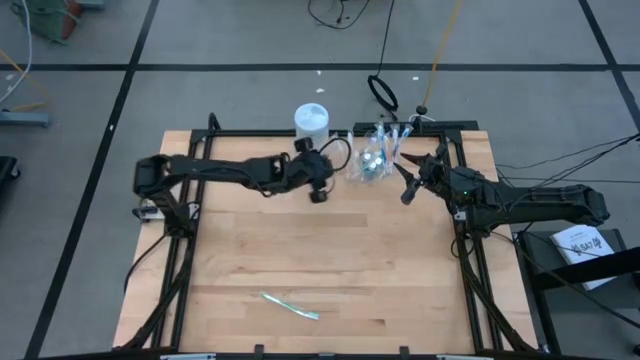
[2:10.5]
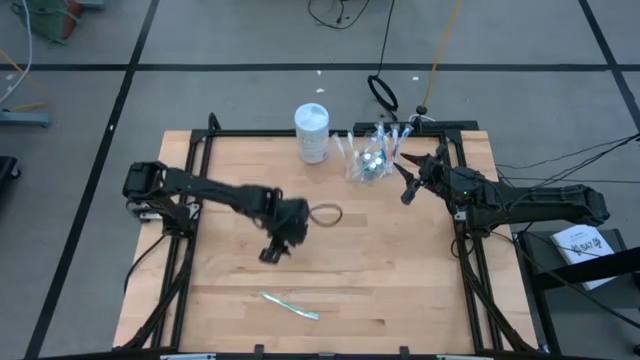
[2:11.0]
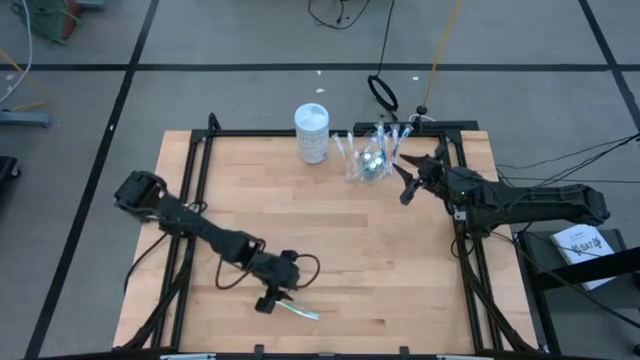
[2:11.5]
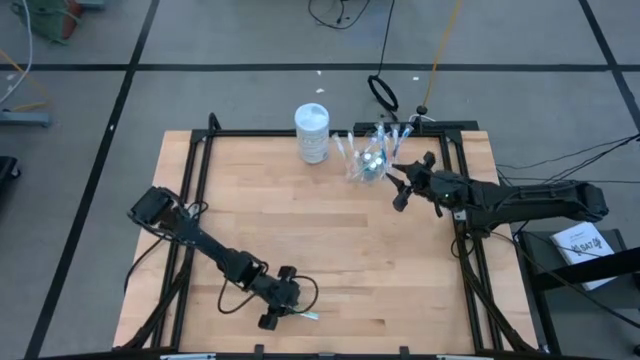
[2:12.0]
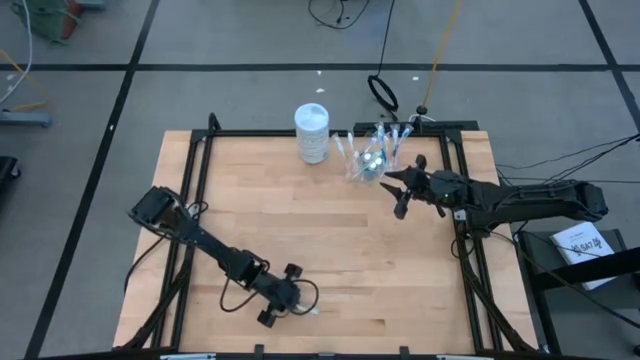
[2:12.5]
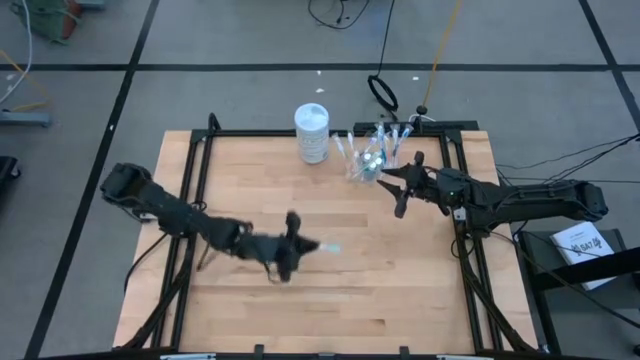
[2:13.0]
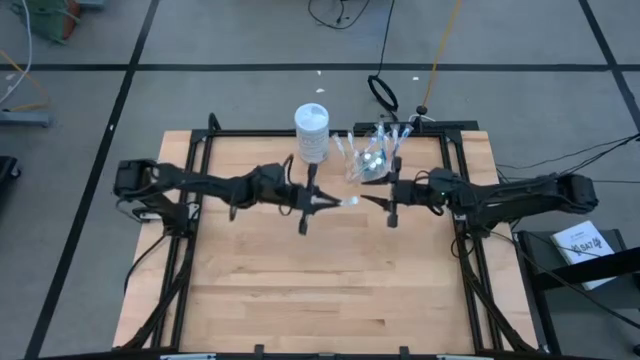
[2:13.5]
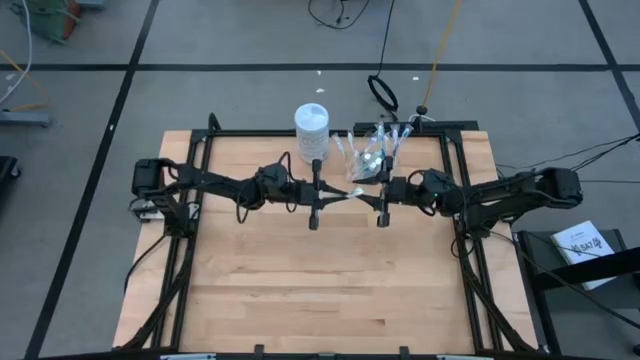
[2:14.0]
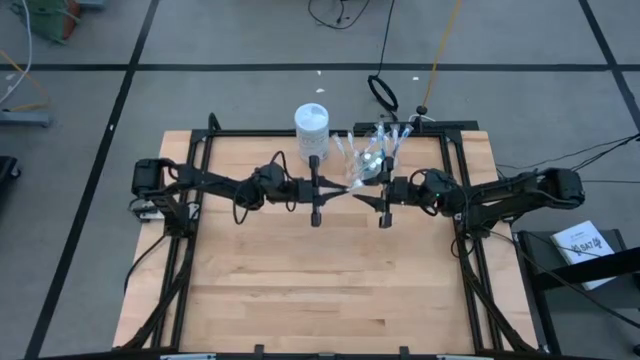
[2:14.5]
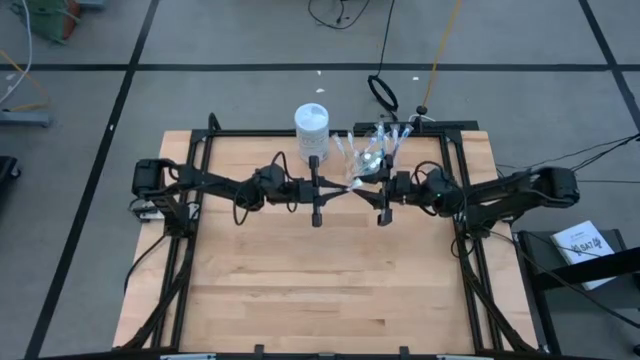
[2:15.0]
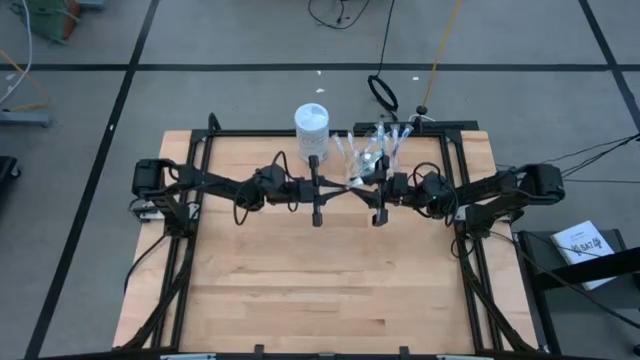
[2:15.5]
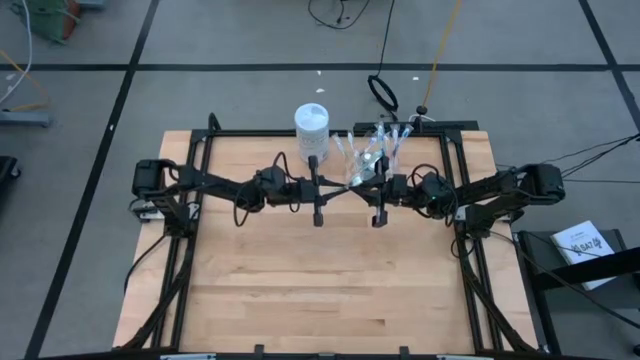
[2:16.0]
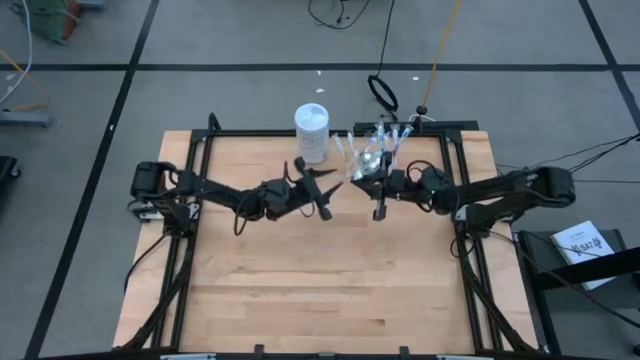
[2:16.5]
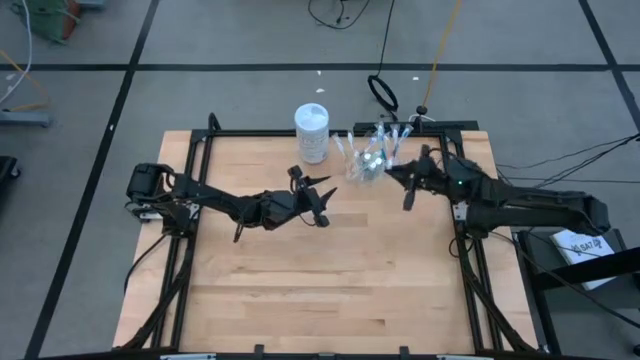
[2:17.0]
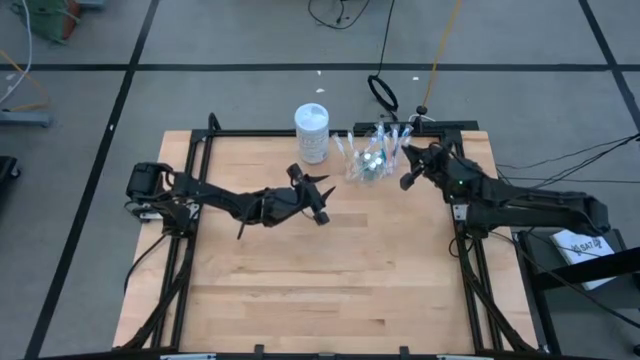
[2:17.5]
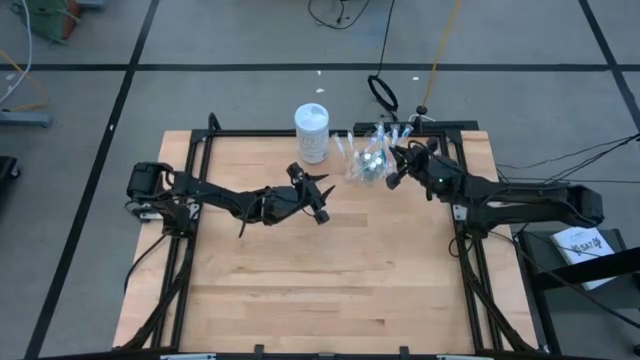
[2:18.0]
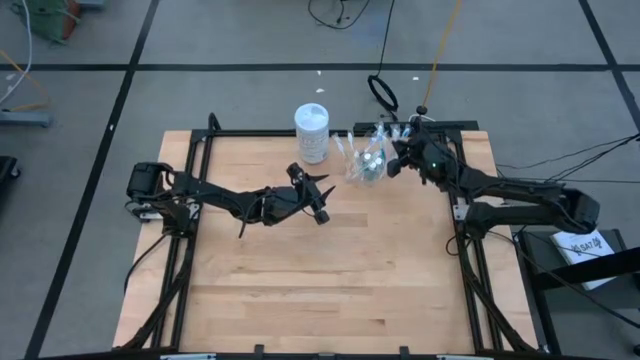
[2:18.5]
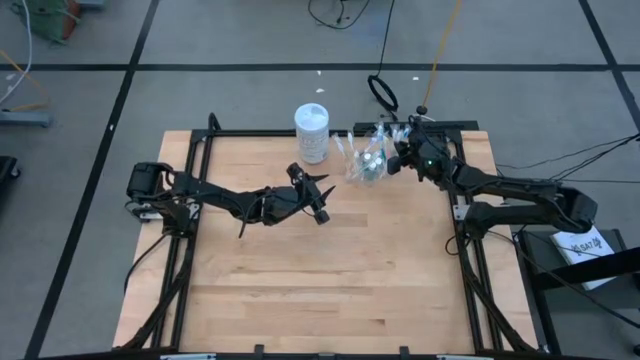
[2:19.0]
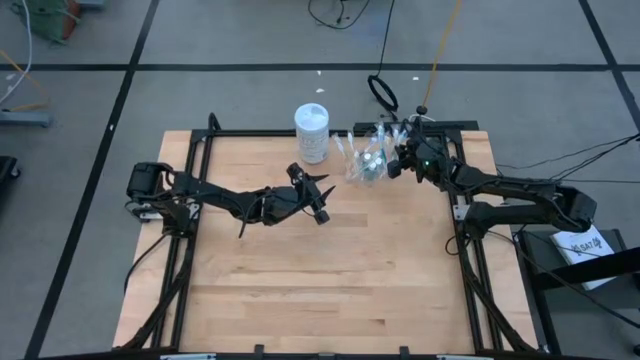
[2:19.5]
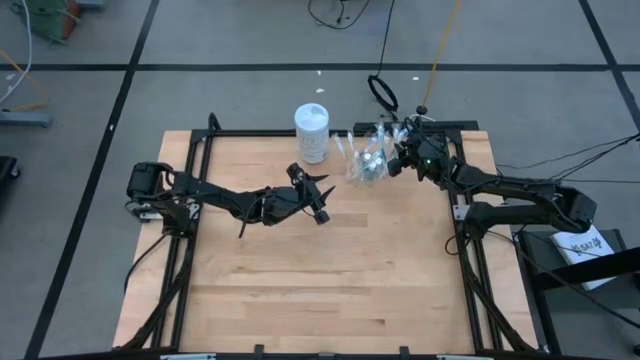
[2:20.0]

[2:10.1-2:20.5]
Task: Pick & Place toothbrushing station
Put the green toothbrush into the transparent organizer

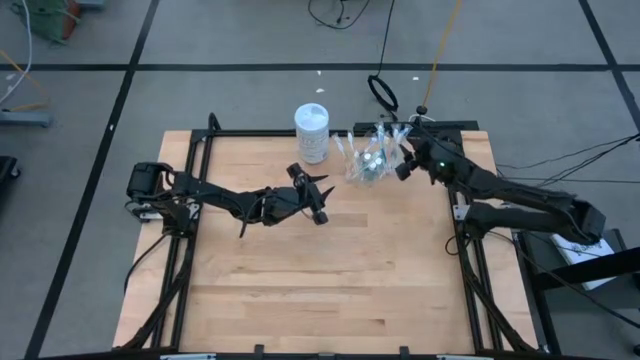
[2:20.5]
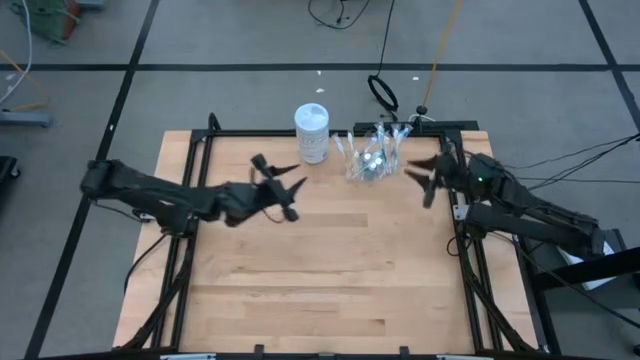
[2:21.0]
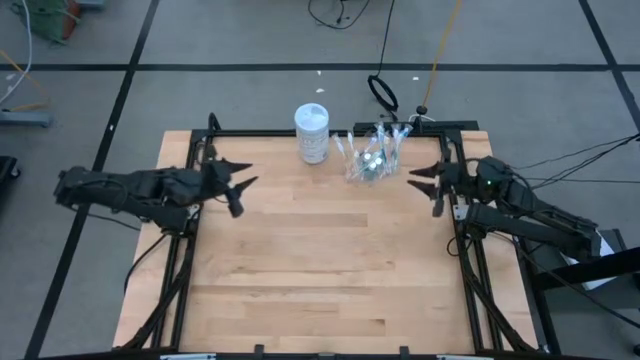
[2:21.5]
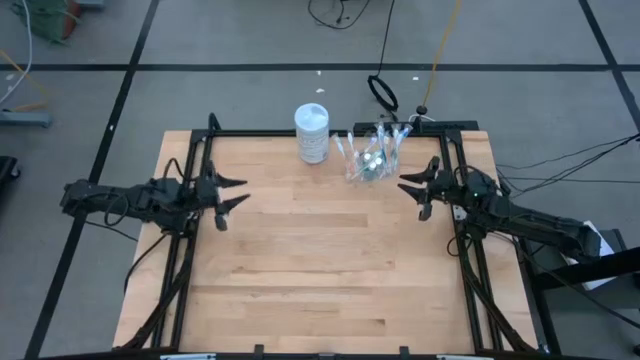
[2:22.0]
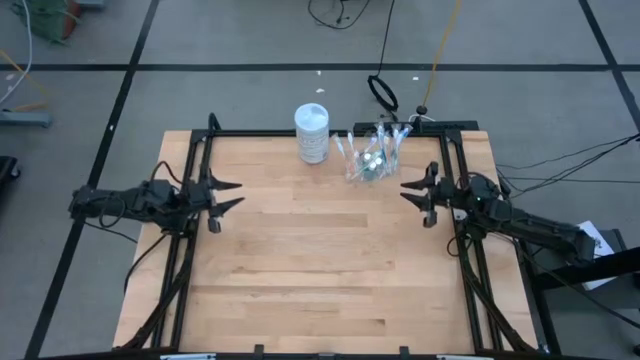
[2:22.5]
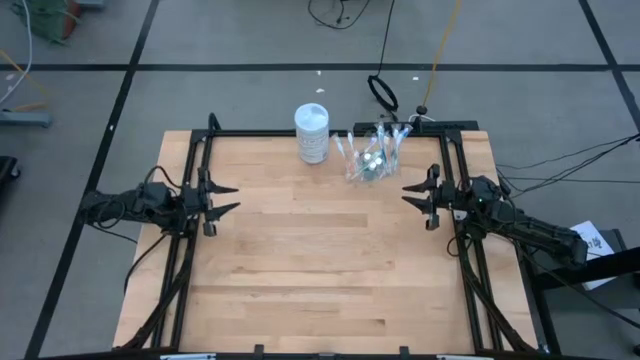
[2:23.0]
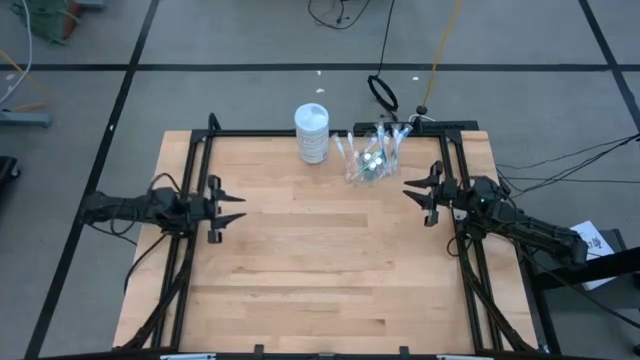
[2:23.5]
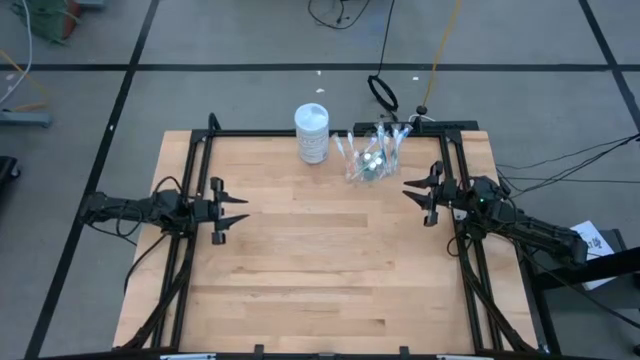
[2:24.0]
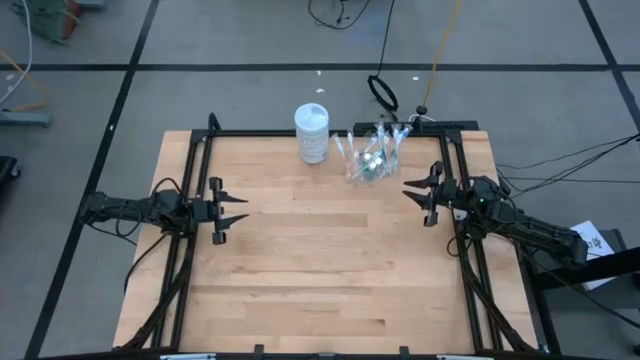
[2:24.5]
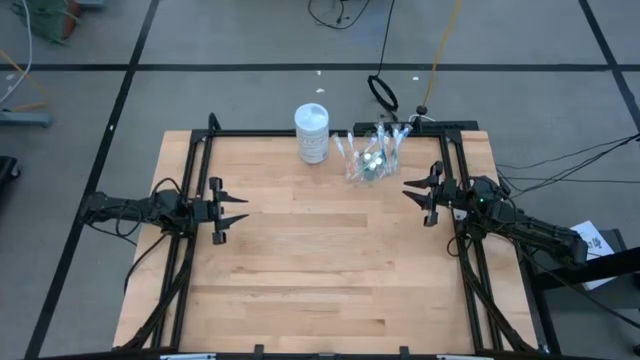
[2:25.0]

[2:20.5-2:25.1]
Return to Home Position

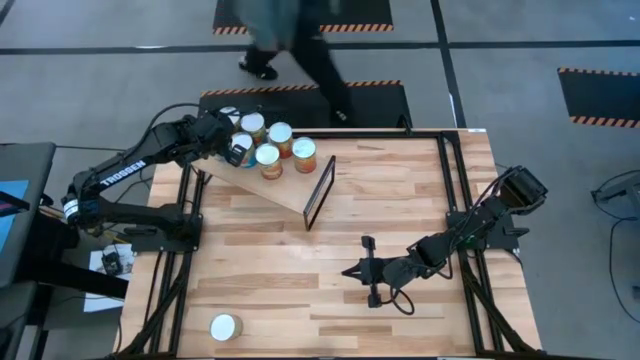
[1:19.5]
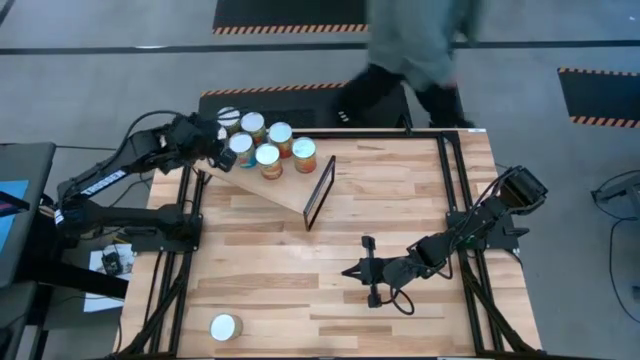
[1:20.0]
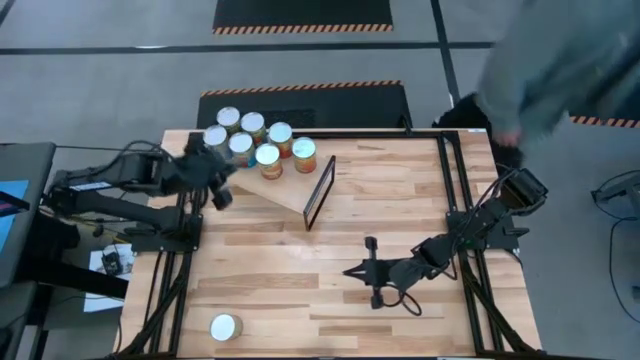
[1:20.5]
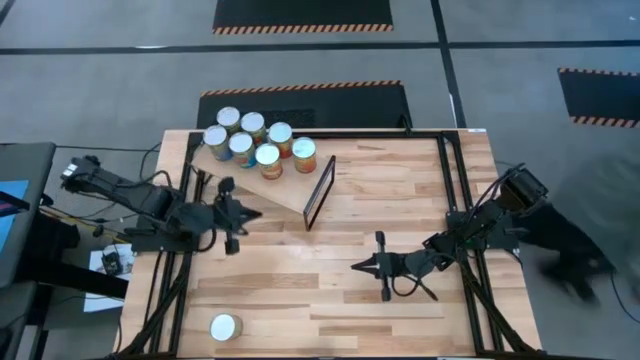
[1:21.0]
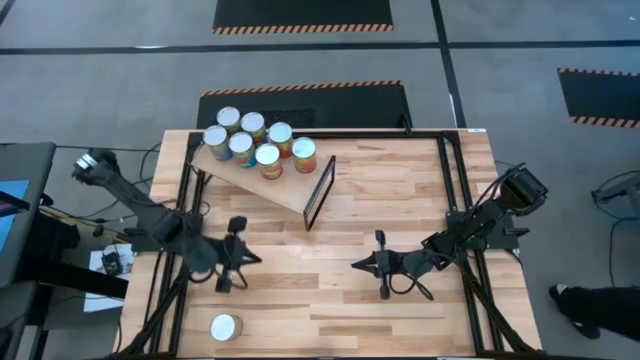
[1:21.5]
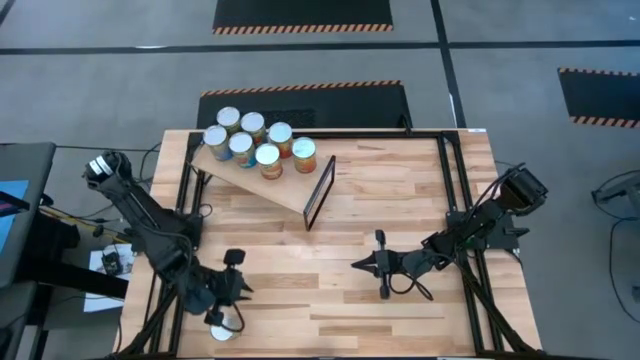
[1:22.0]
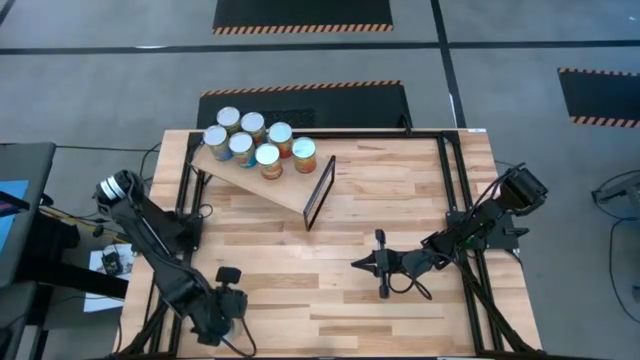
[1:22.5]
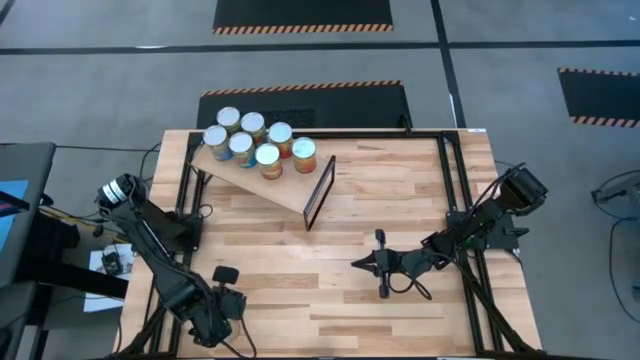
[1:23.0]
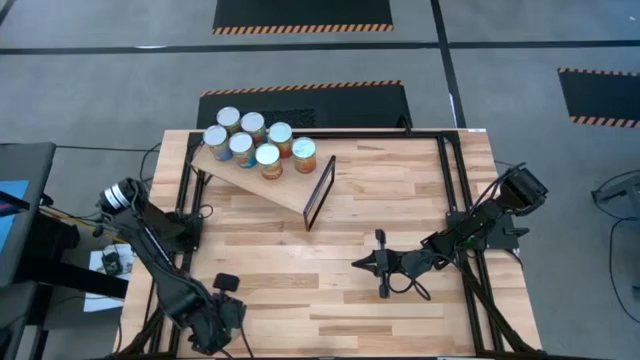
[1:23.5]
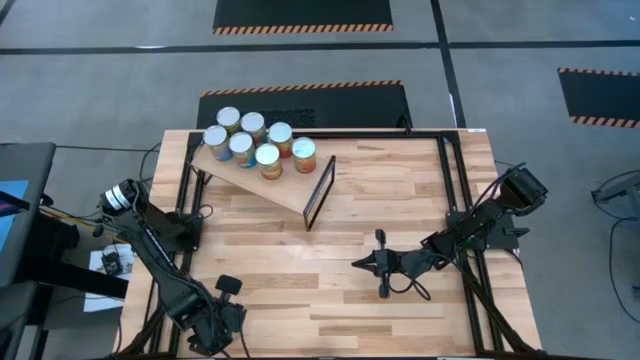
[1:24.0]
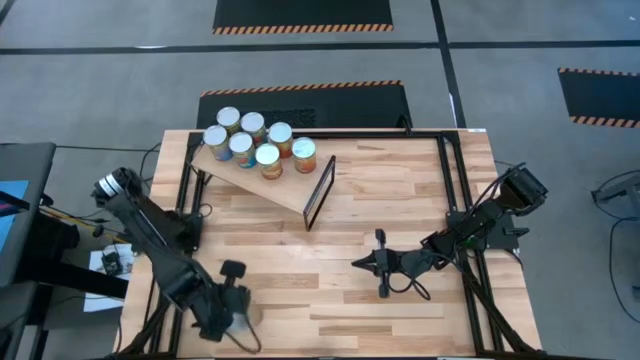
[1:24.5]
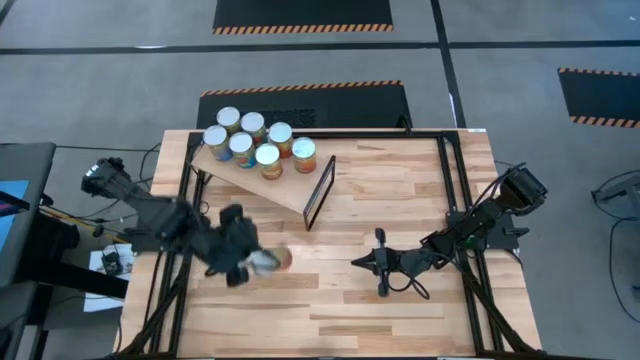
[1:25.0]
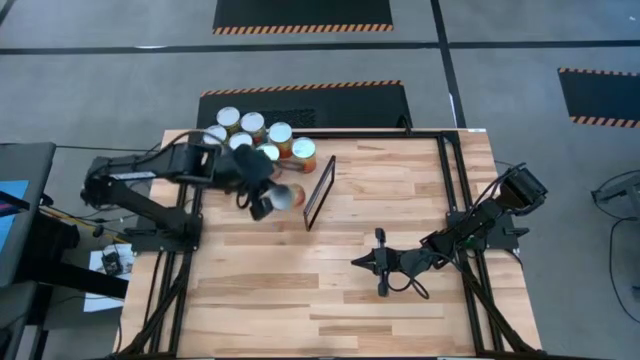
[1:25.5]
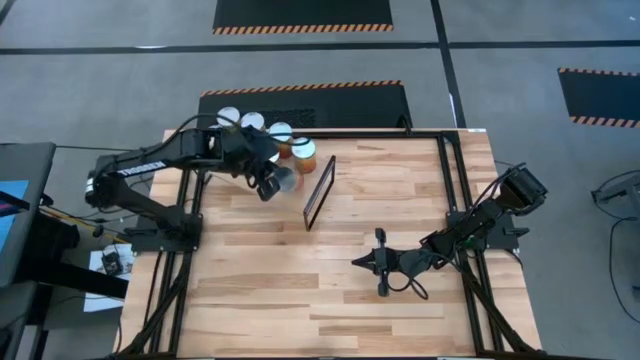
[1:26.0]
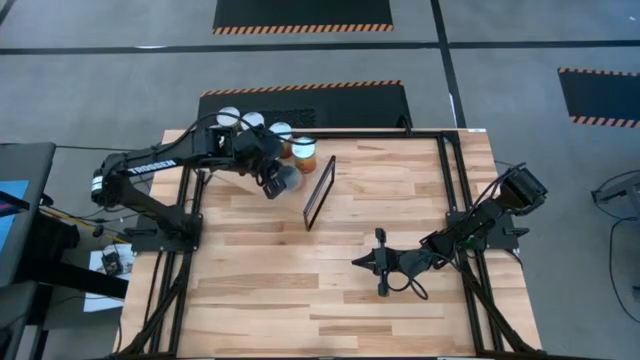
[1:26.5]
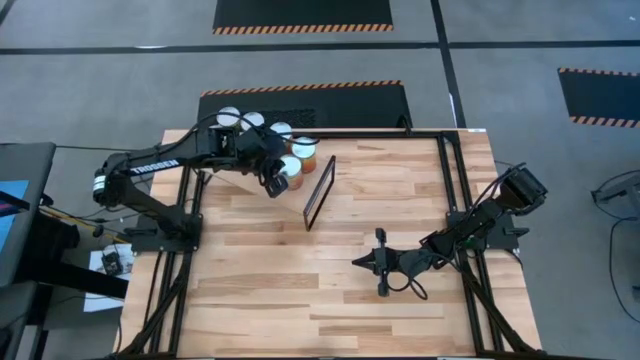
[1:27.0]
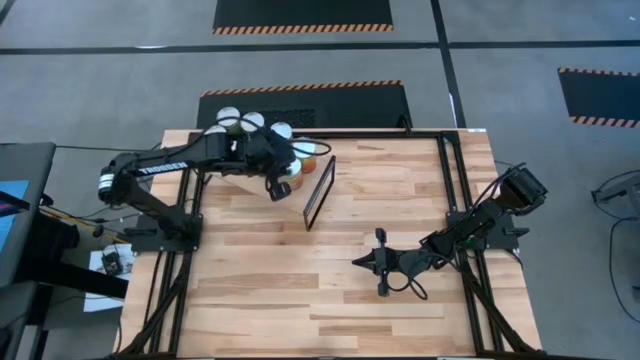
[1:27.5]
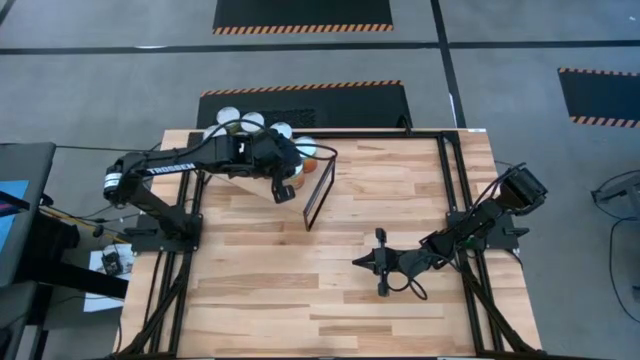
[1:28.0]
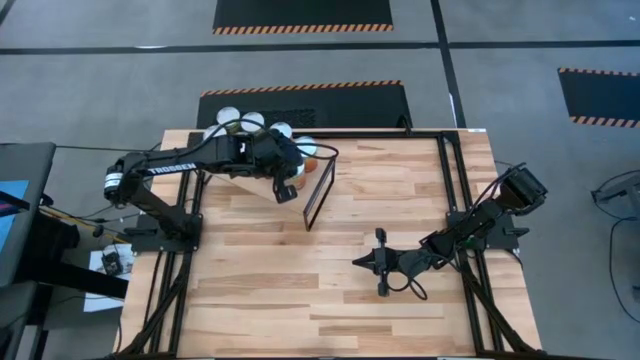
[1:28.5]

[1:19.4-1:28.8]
Task: Pick and place cans onto a shelf
Align the canned green beans with the other canned green beans on the shelf
